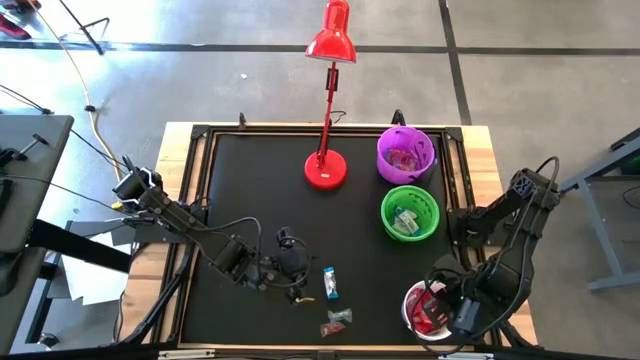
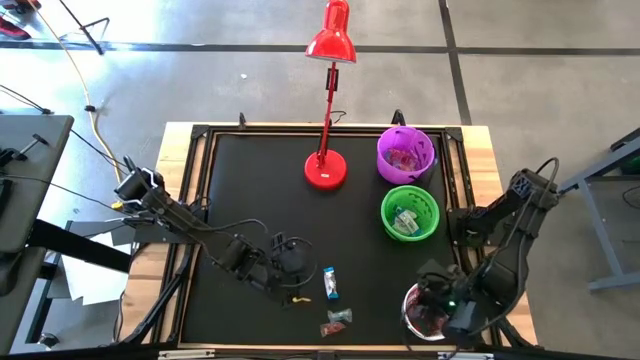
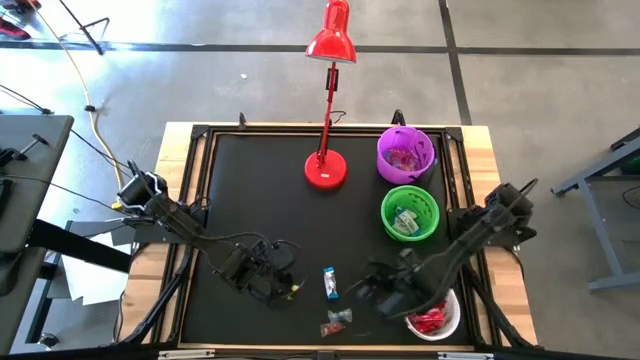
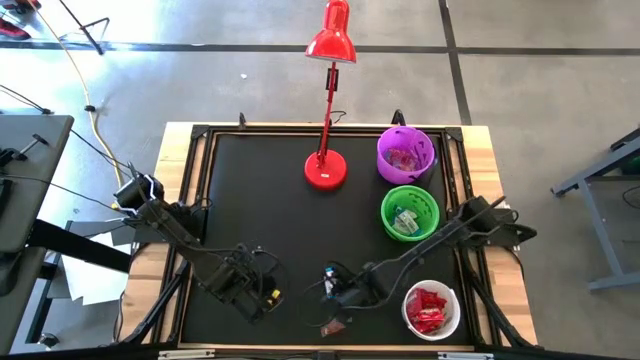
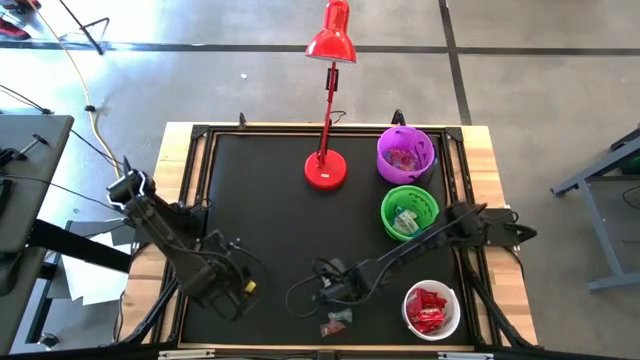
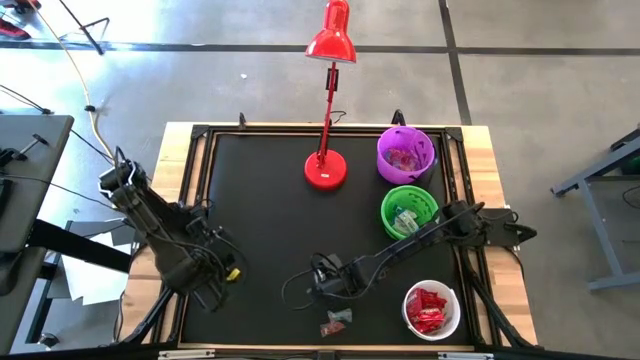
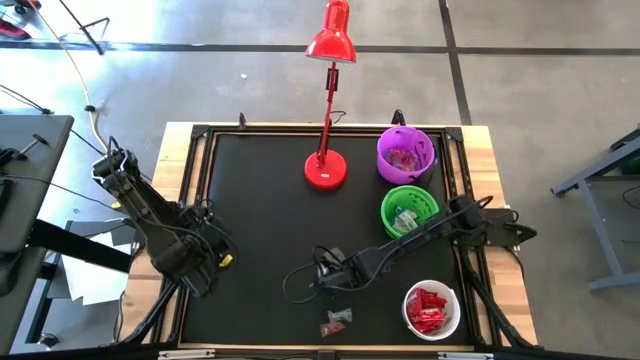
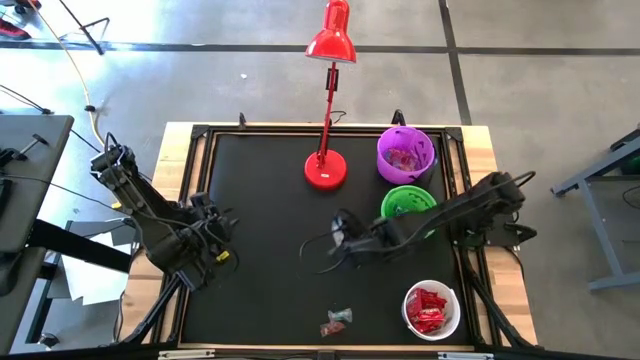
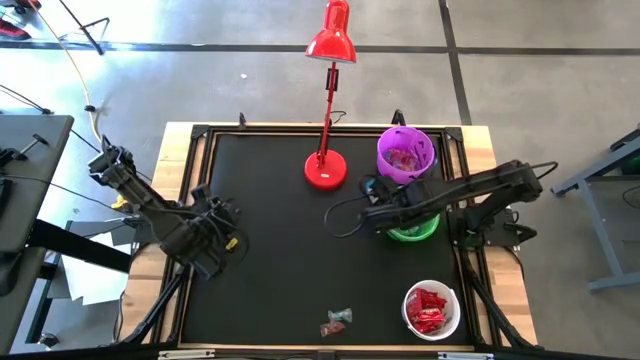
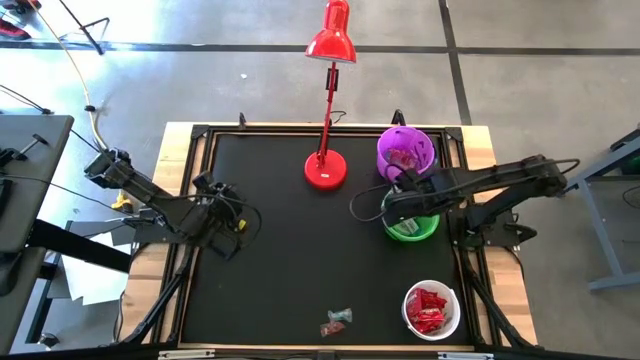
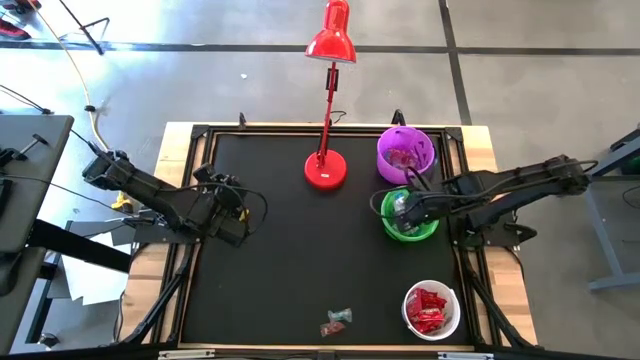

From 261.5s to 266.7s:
Task: Organize candy in baskets
Put the white chocolate bar into the green bucket

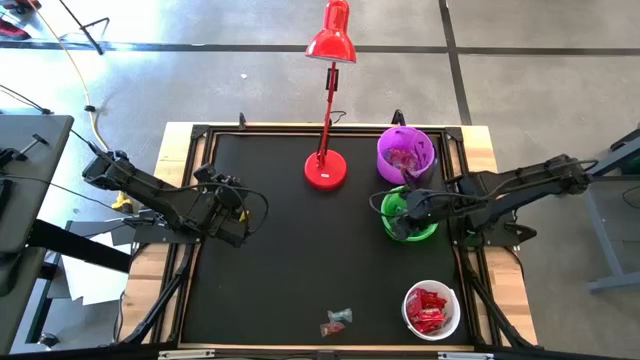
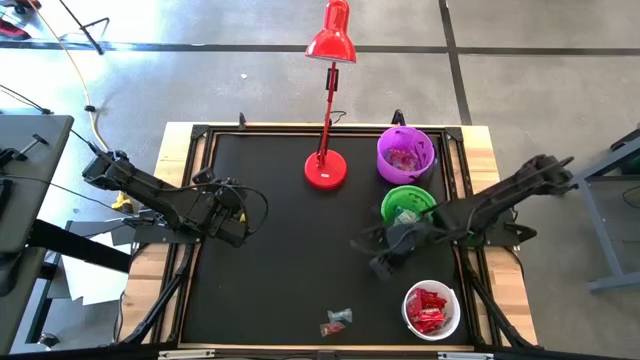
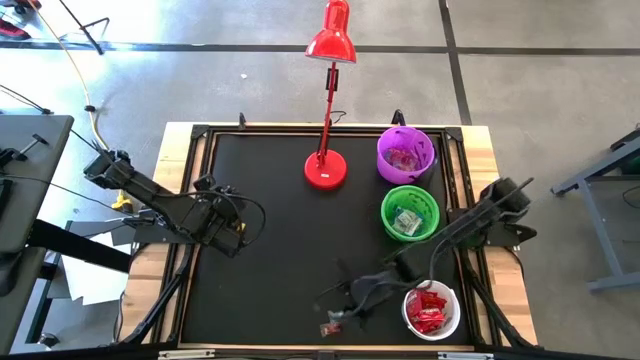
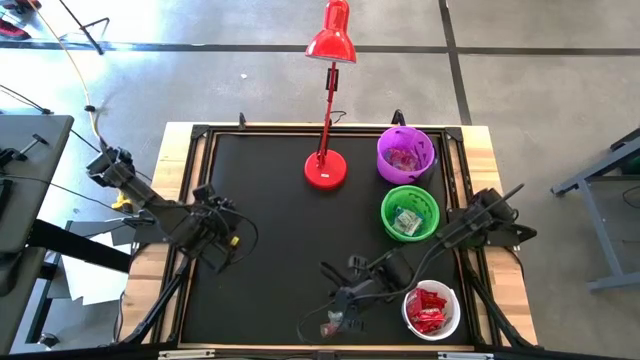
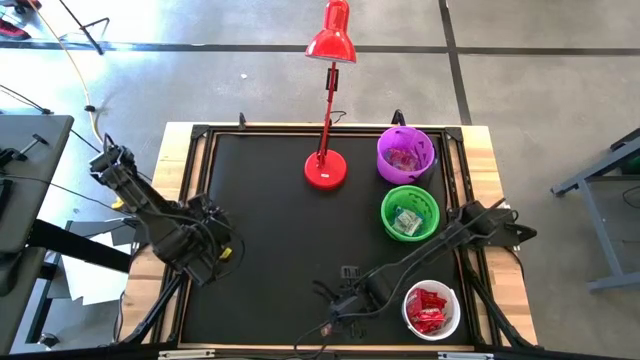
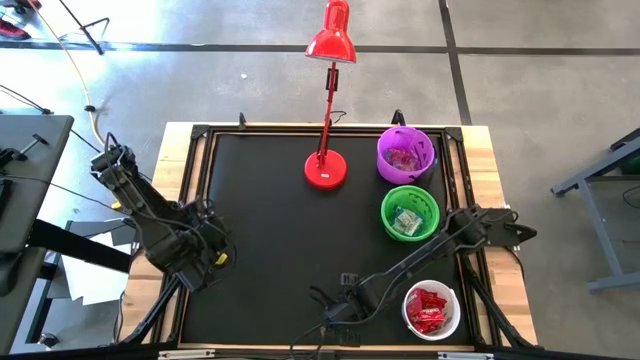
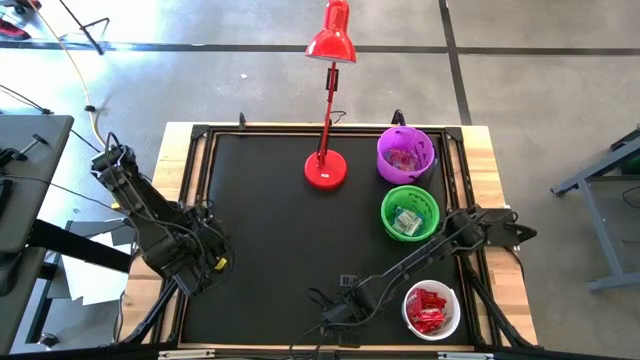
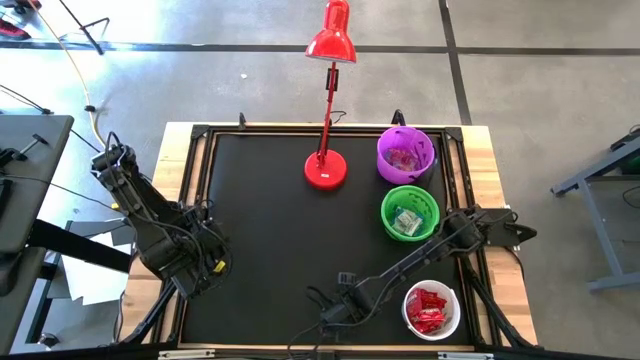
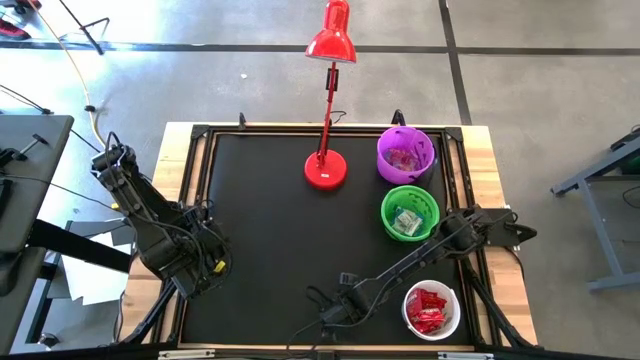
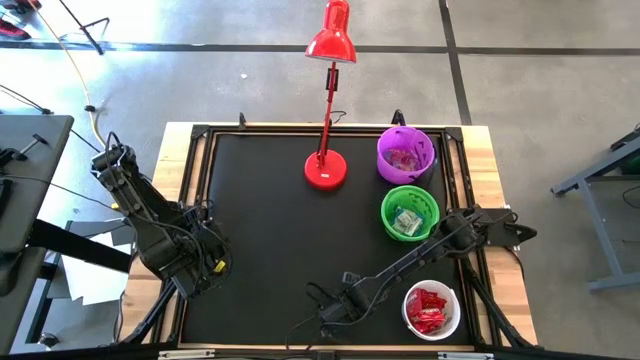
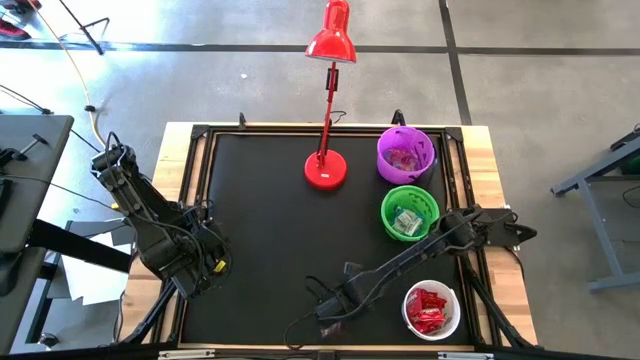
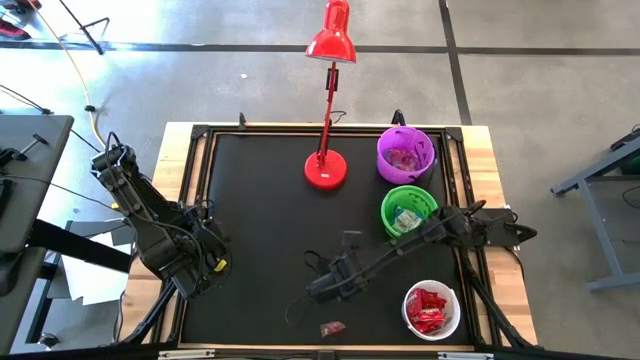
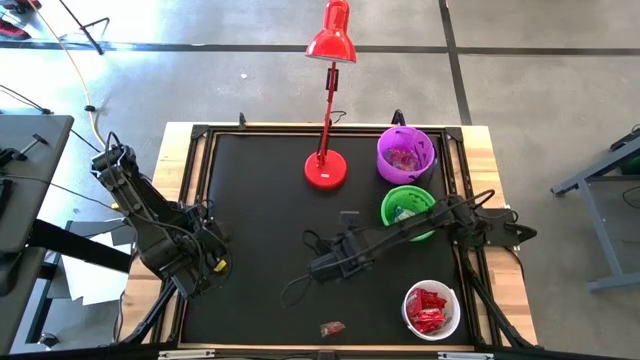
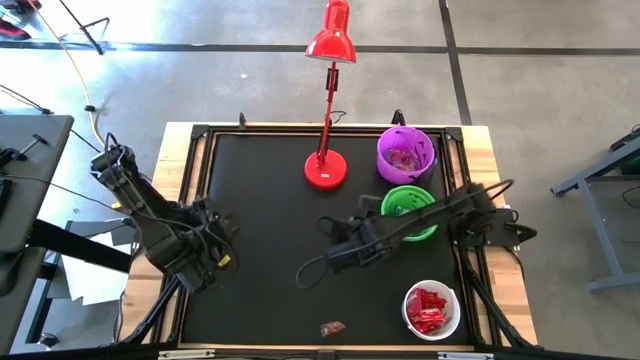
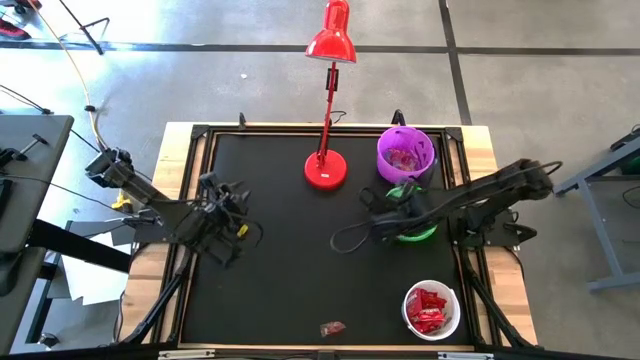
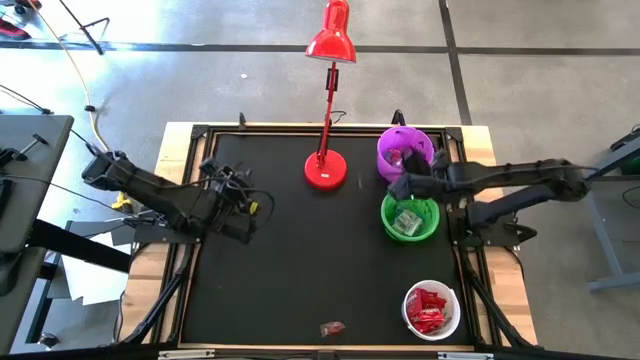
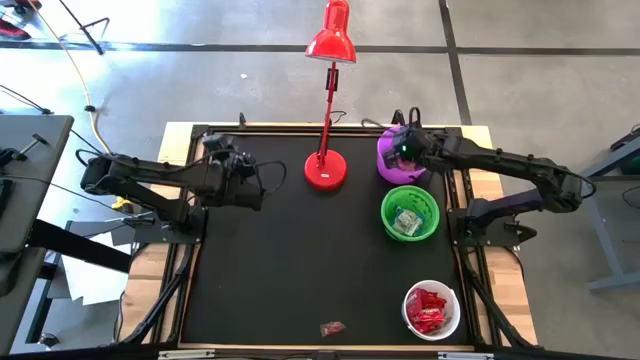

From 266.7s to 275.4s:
Put the blue gummy into the violet bucket

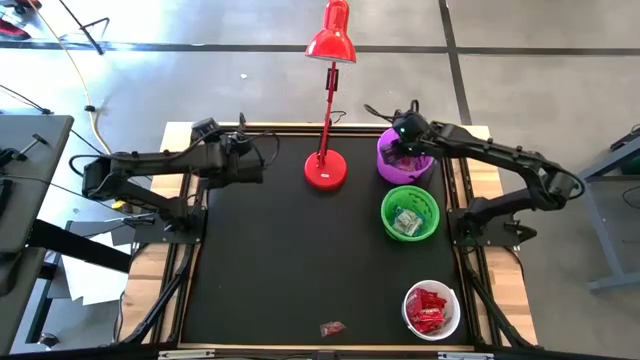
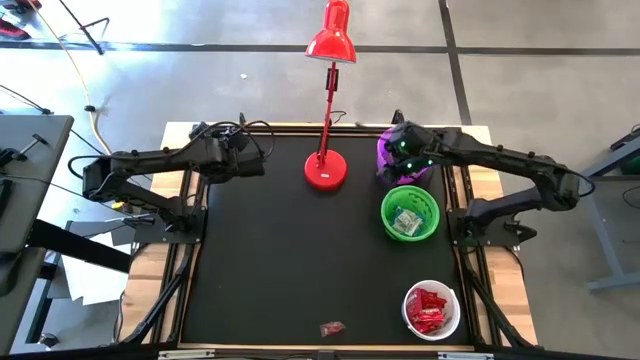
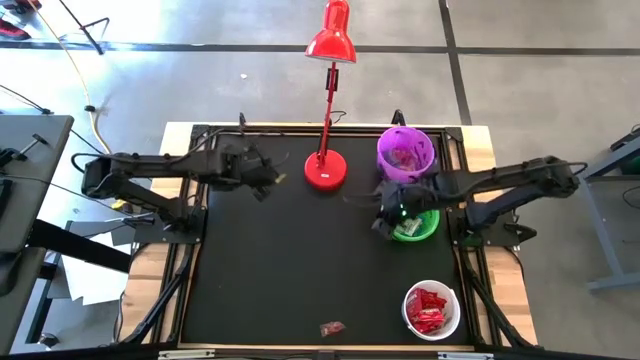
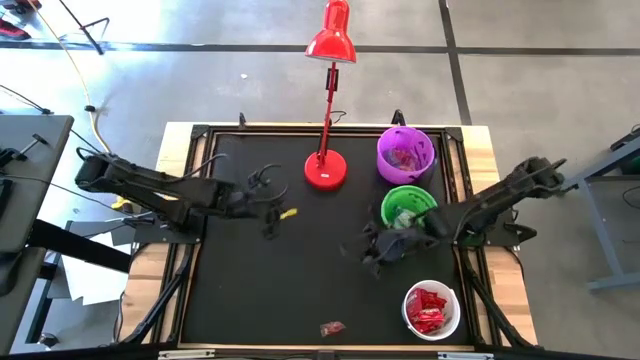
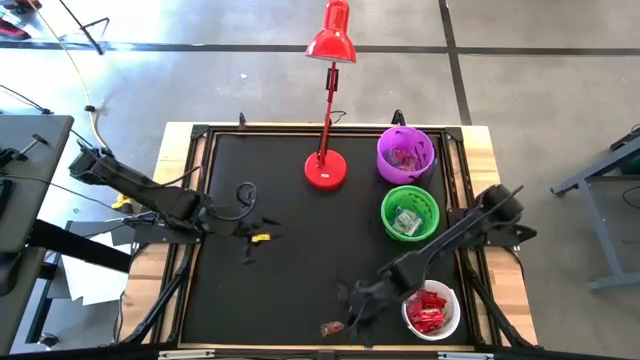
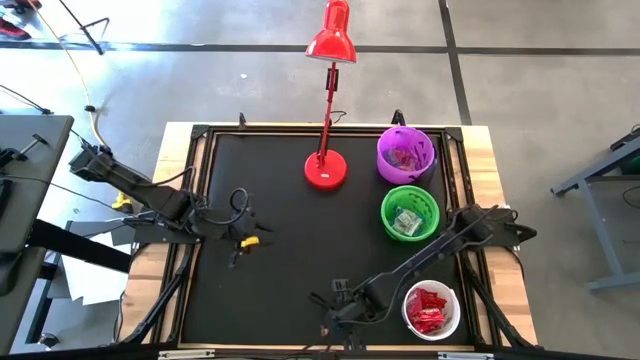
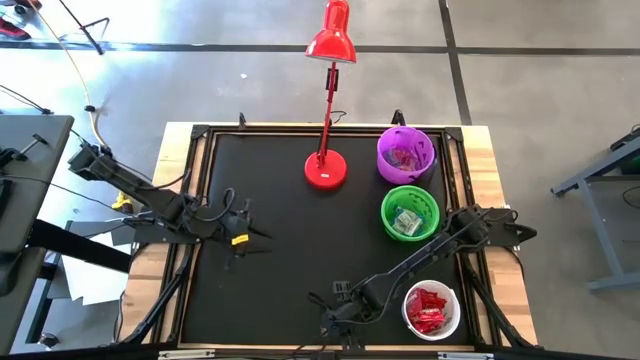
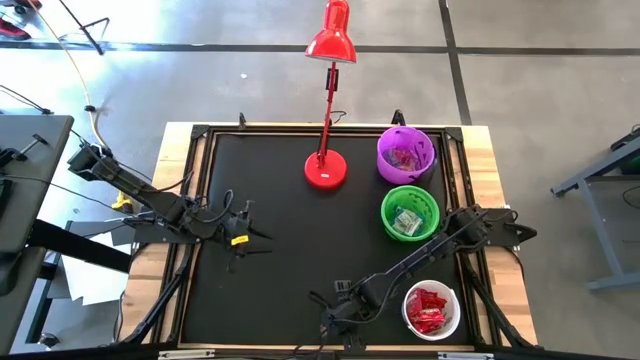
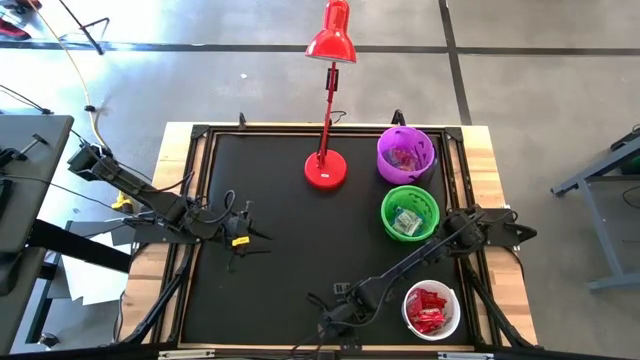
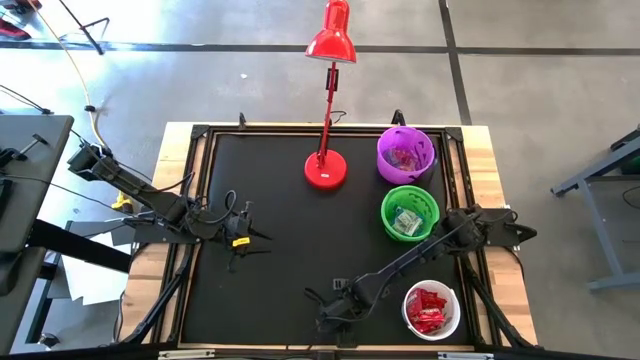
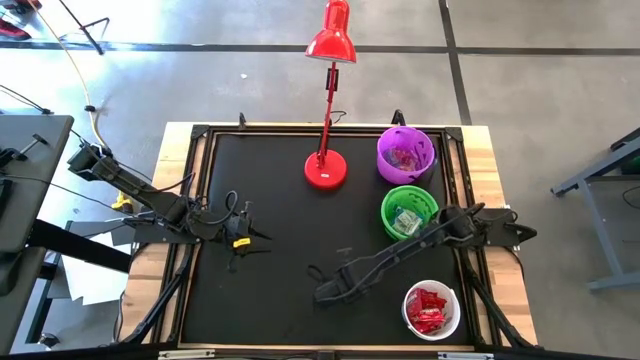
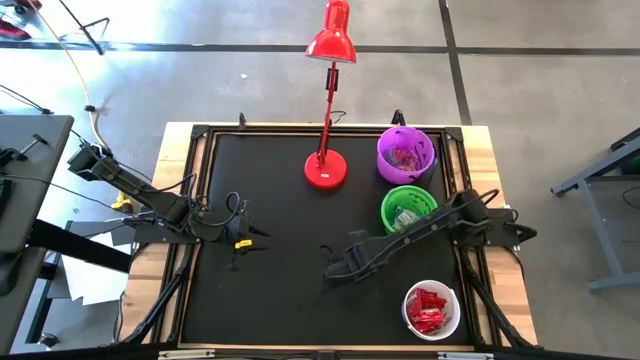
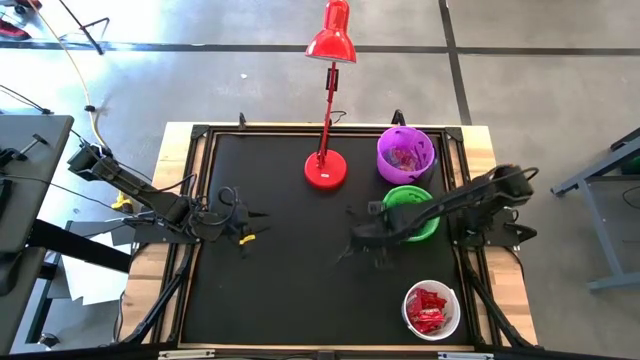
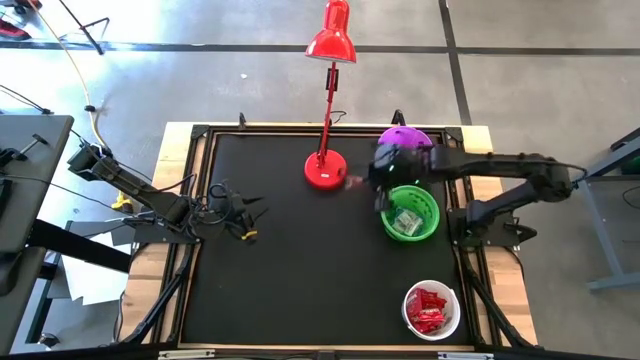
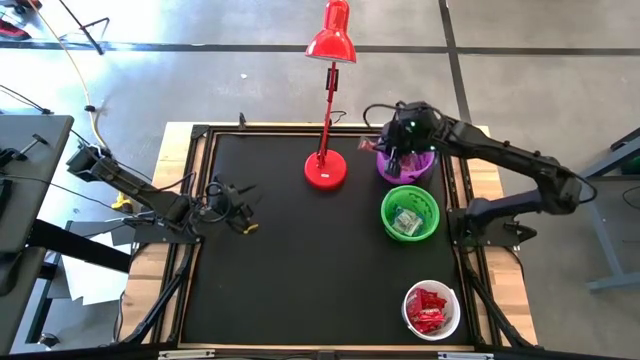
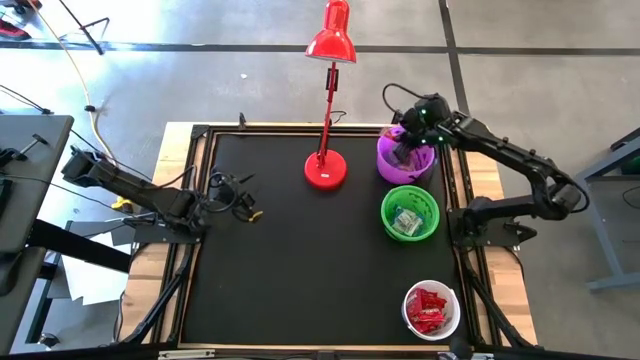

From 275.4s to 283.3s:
Put the red gummy into the violet bucket
